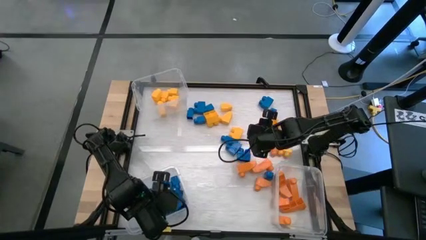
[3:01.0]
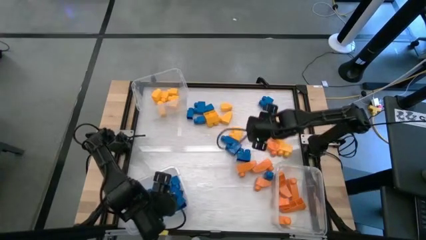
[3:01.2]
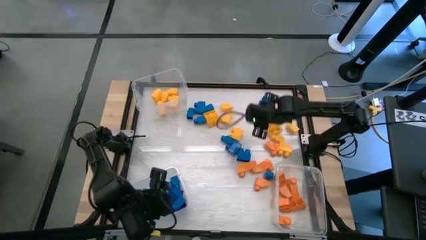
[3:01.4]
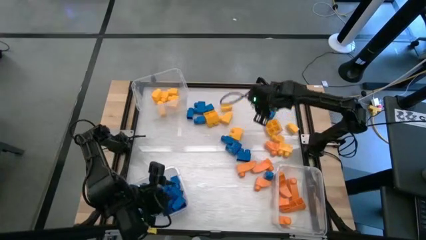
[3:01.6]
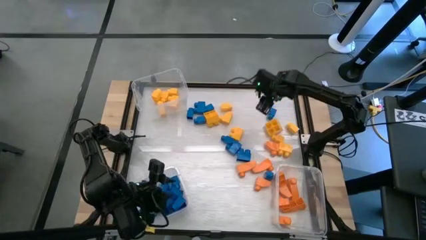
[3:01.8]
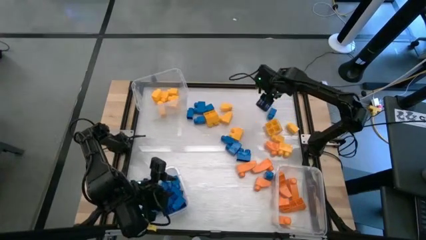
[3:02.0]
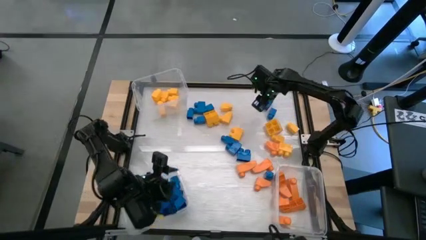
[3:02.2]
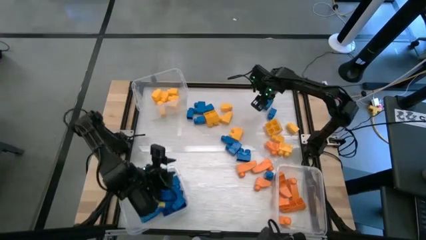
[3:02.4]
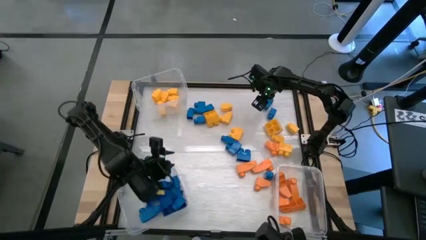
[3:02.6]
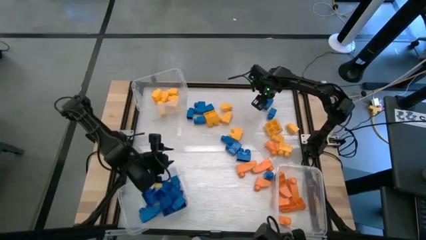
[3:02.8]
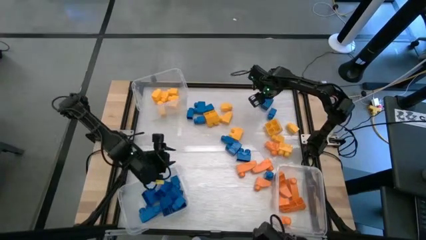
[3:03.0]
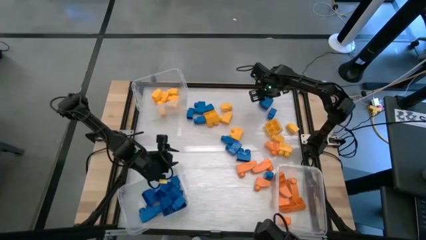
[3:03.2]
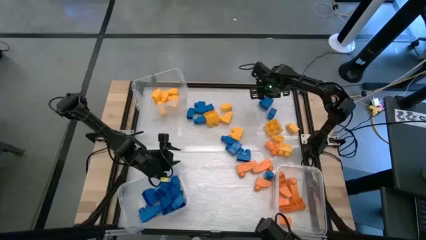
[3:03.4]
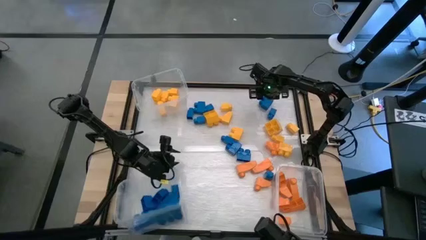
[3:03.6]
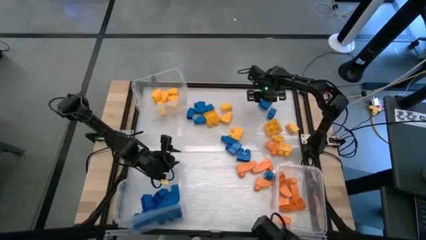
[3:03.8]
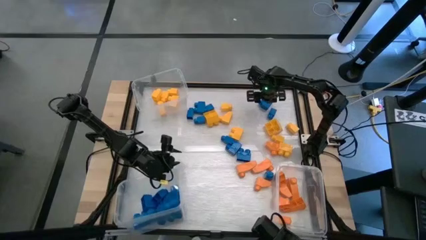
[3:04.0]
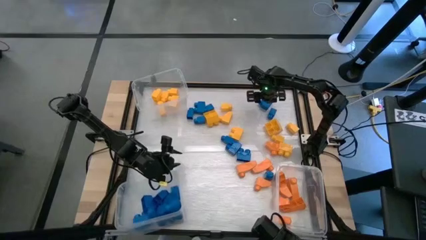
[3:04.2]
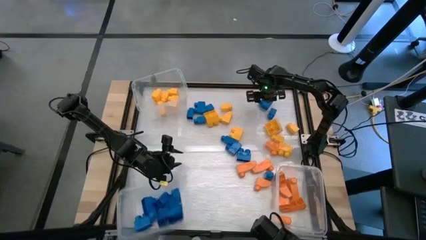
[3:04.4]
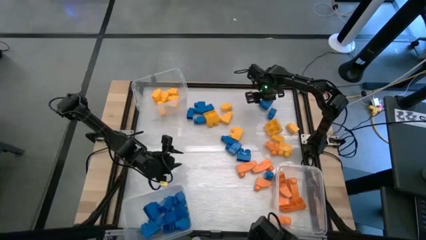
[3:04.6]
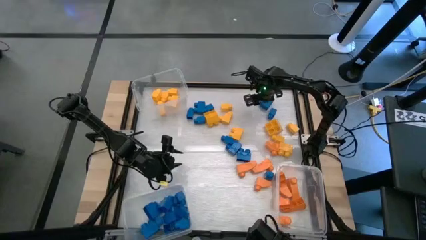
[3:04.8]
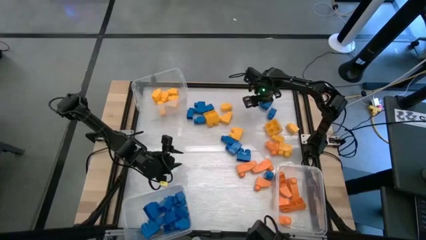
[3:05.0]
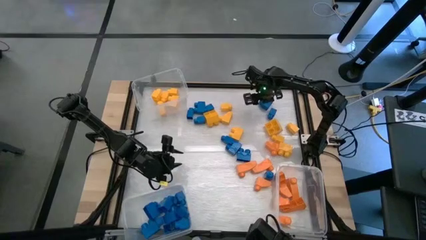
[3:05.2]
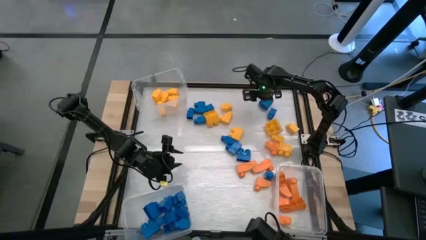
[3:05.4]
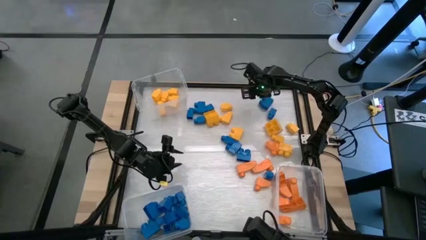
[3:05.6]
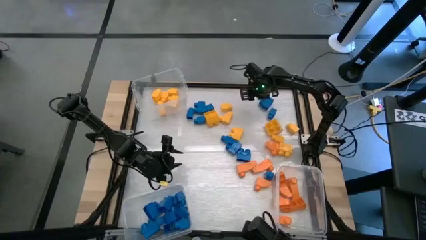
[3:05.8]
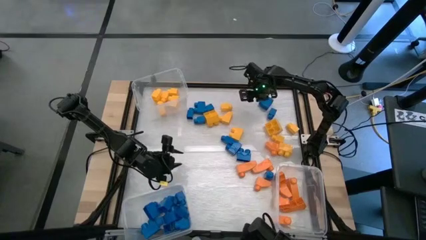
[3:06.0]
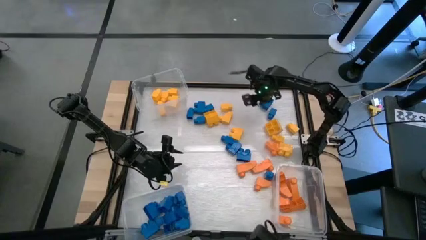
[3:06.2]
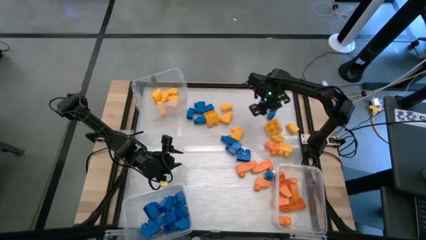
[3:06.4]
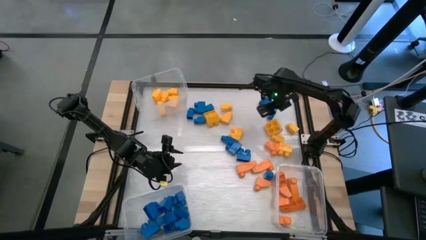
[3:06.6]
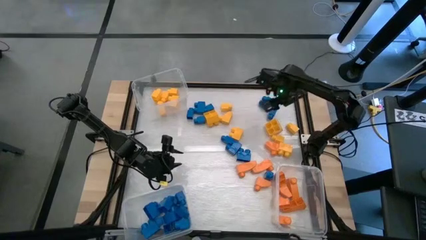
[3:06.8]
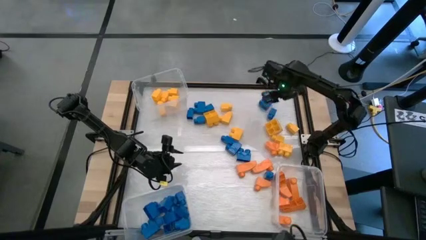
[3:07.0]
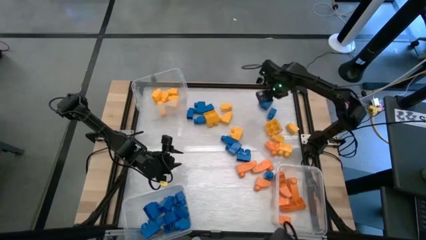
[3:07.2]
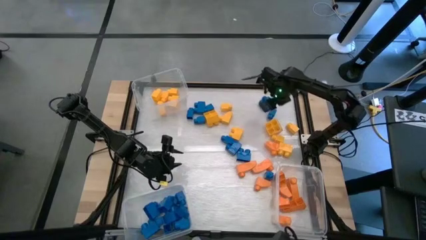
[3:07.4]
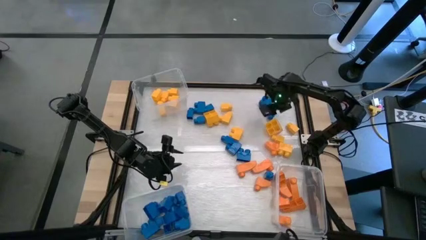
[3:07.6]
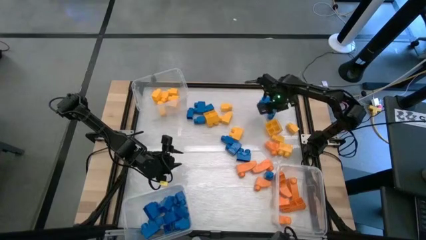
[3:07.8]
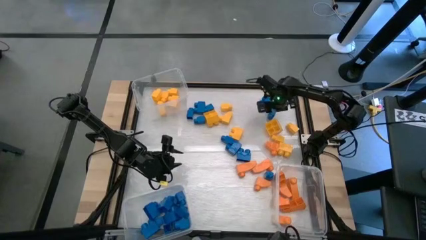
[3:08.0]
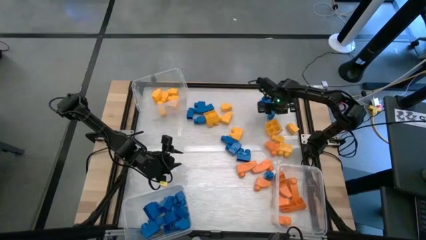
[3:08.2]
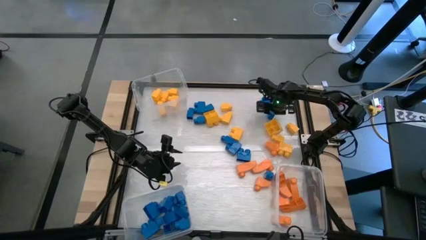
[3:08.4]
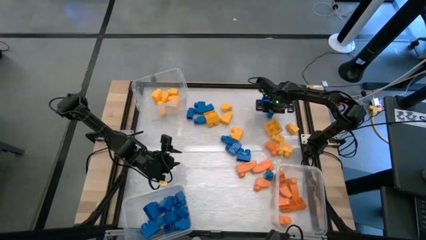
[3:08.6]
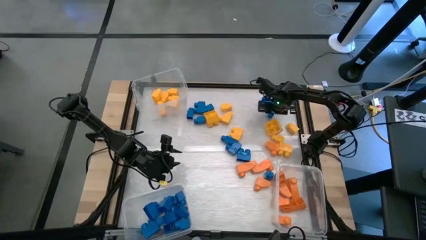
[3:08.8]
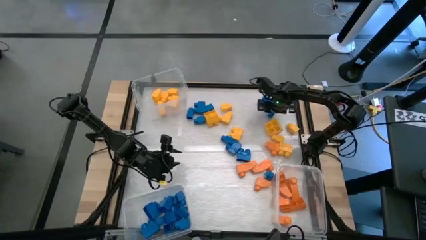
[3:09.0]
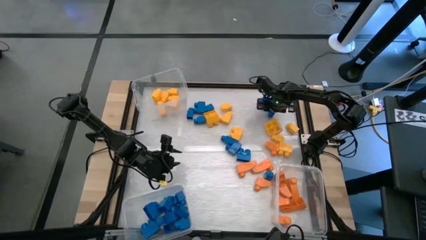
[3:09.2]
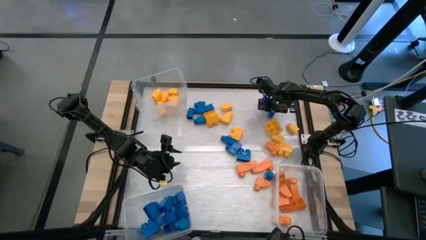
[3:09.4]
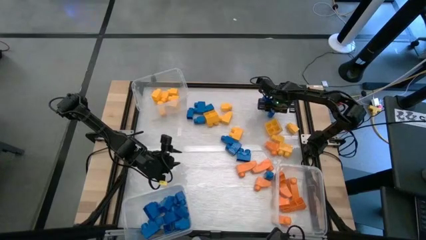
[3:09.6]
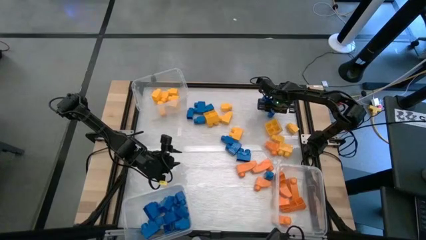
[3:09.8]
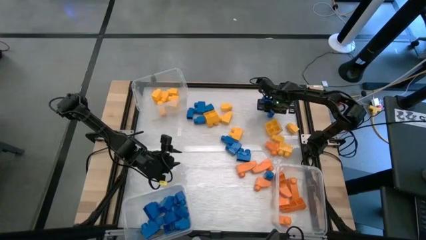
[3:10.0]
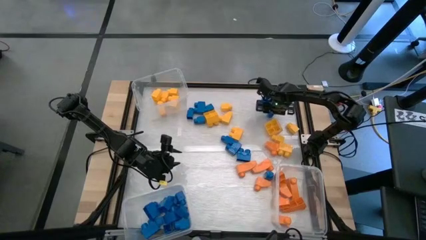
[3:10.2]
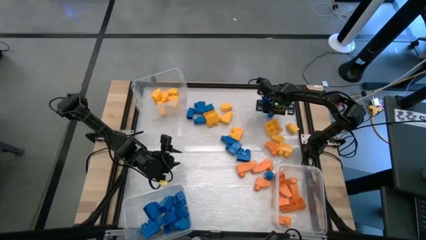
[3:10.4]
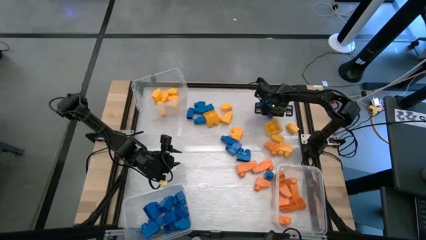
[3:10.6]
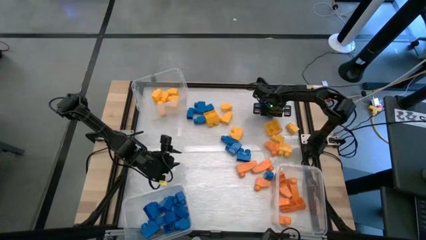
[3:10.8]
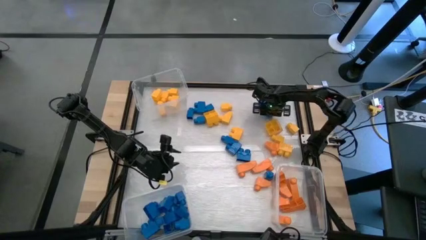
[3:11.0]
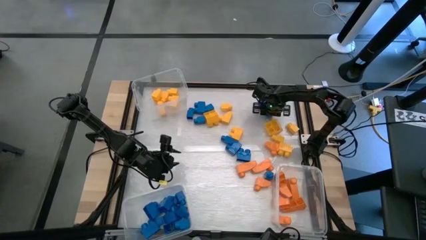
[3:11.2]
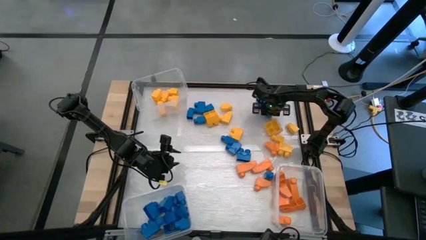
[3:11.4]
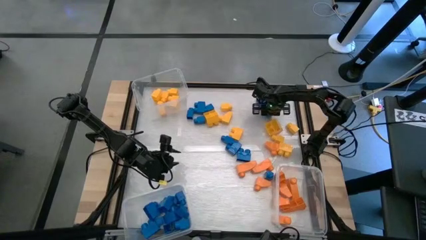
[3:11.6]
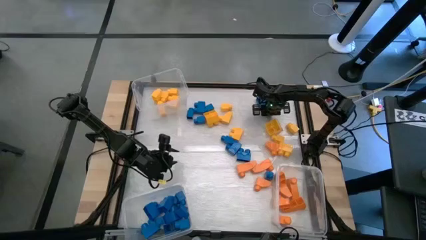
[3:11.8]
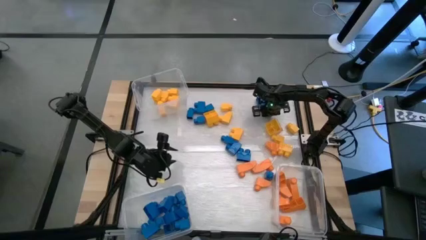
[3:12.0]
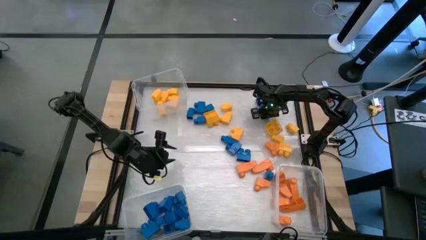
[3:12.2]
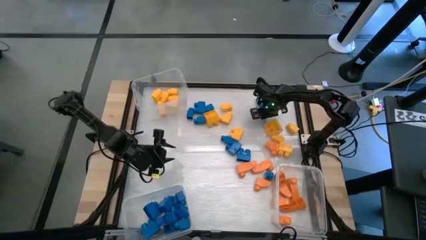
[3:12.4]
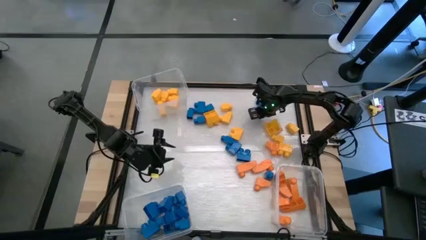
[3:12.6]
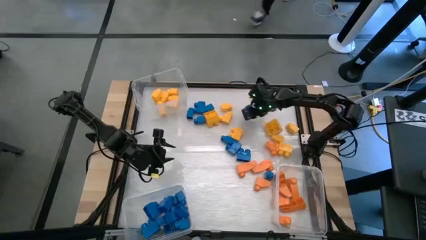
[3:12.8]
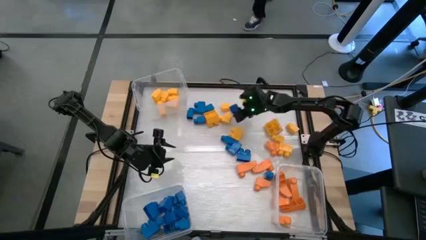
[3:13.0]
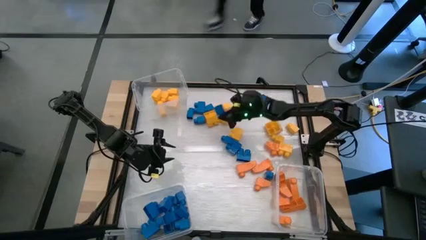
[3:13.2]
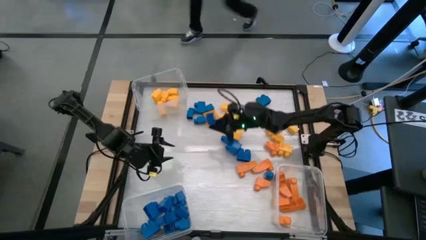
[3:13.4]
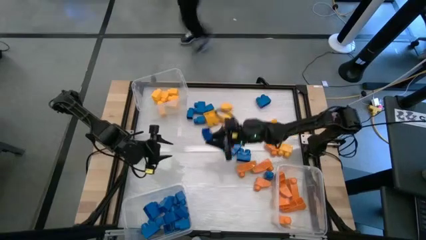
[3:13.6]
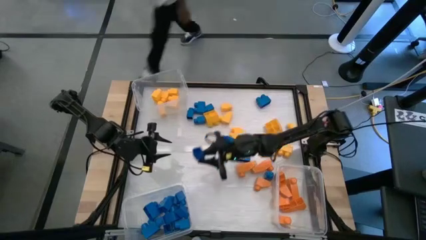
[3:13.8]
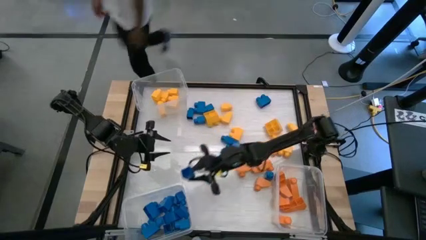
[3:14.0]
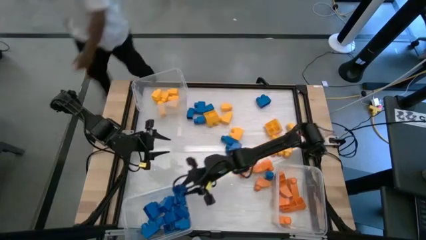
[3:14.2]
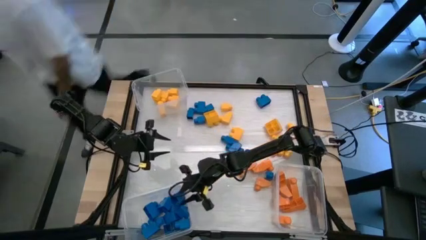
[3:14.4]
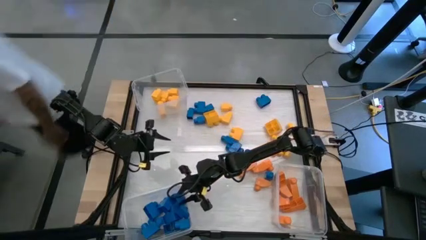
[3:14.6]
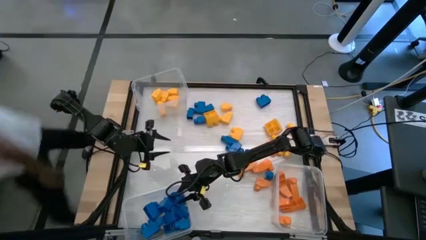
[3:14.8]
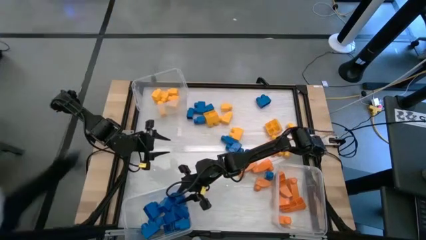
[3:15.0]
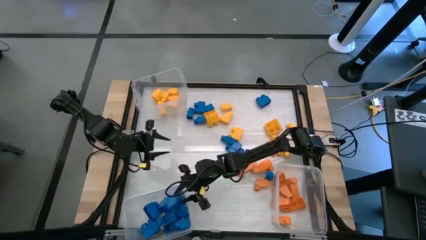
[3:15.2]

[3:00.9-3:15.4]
Task: Sort blocks
Put the blue game piece into the bottom left transparent bin

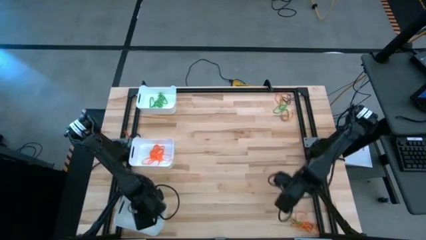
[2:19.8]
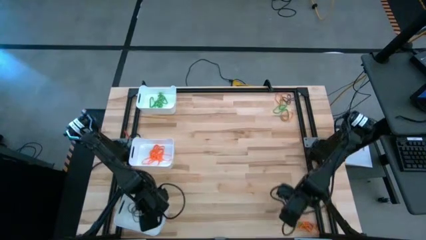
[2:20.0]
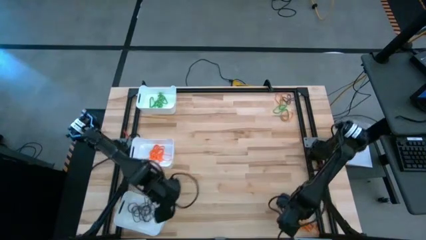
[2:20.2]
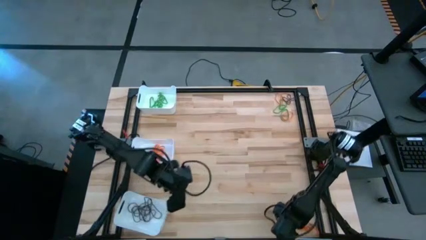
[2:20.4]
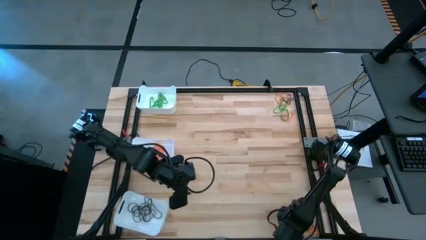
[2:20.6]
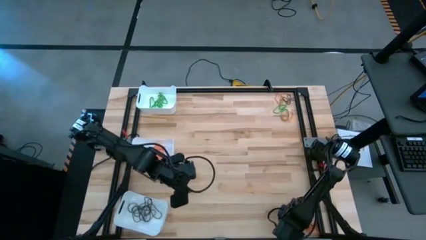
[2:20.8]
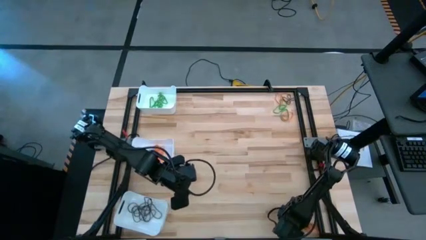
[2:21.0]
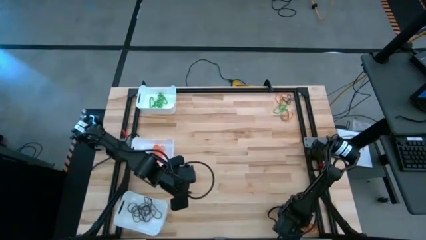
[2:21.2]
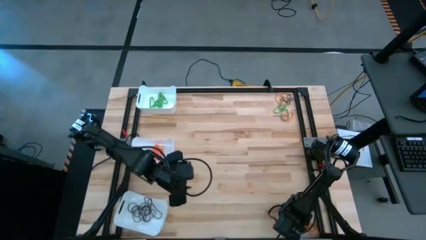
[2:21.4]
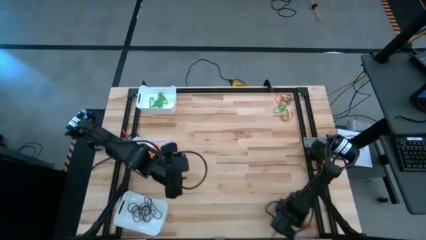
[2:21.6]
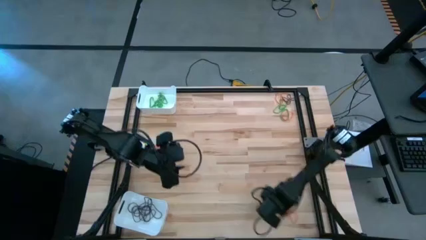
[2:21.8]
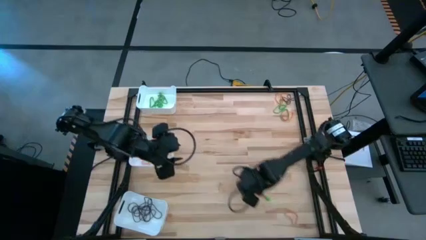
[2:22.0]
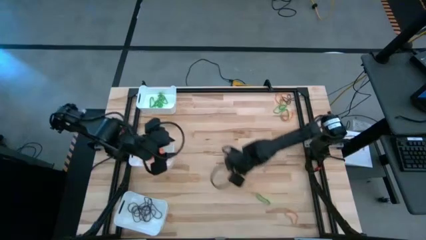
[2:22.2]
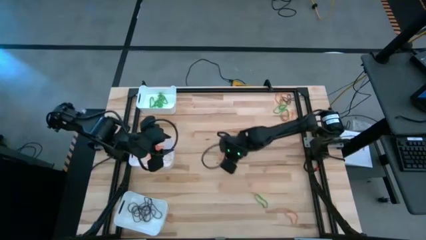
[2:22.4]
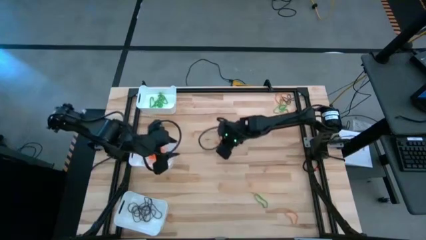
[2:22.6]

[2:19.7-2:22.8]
Task: Sort rubber bands into baskets
Put the orange rubber band into the middle white bin
